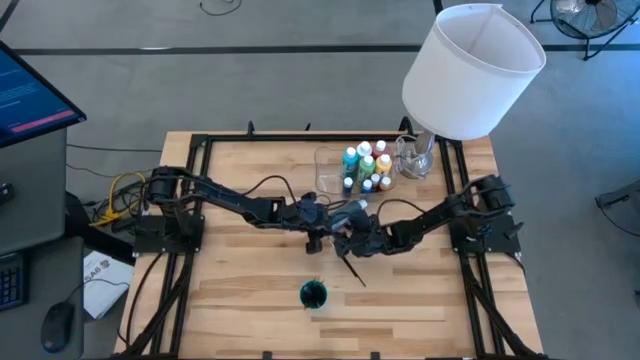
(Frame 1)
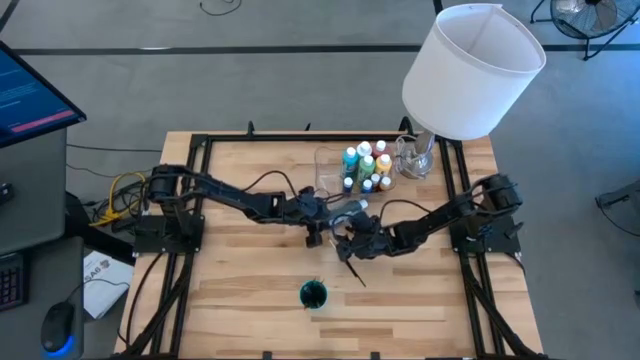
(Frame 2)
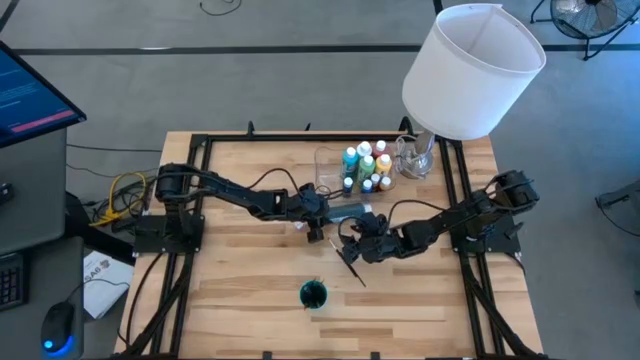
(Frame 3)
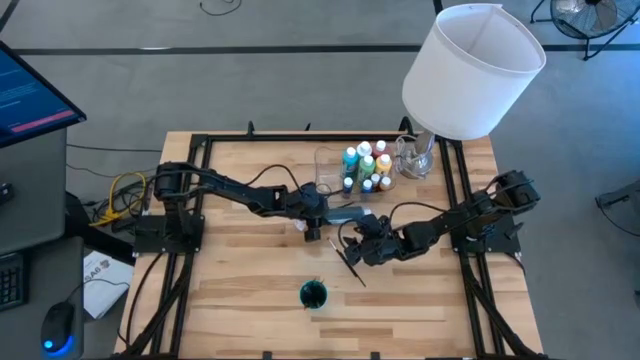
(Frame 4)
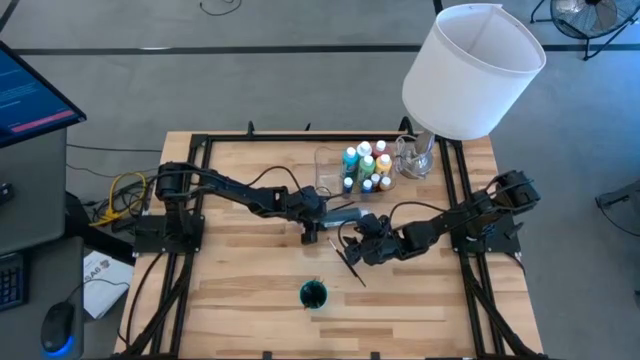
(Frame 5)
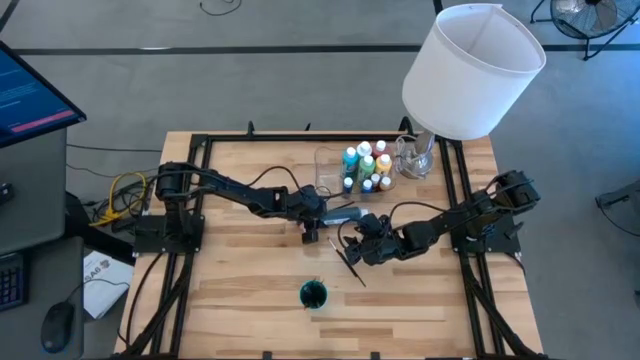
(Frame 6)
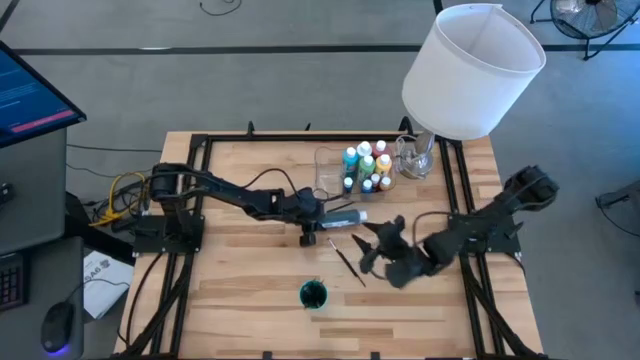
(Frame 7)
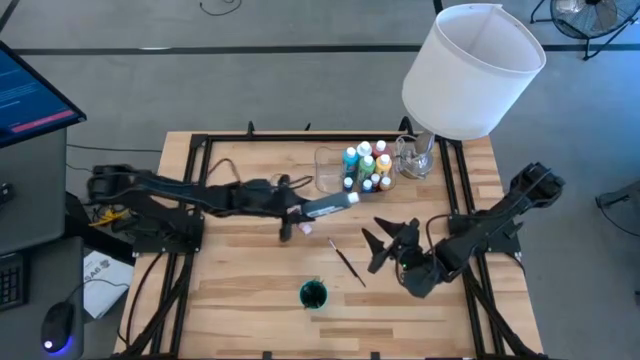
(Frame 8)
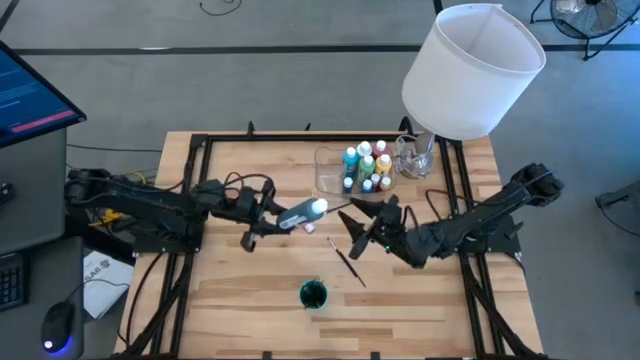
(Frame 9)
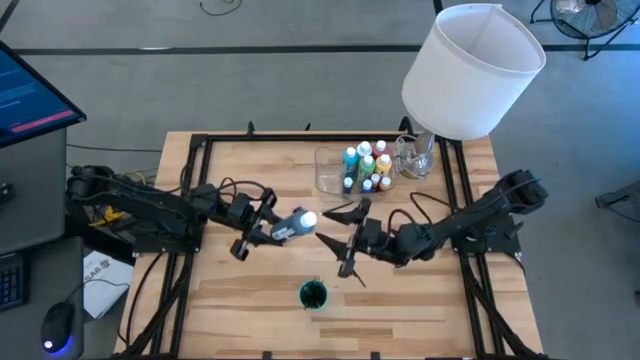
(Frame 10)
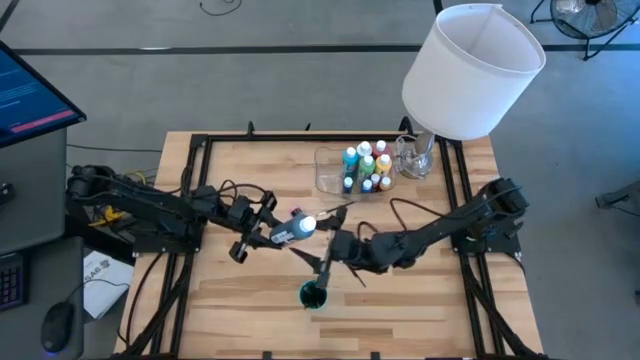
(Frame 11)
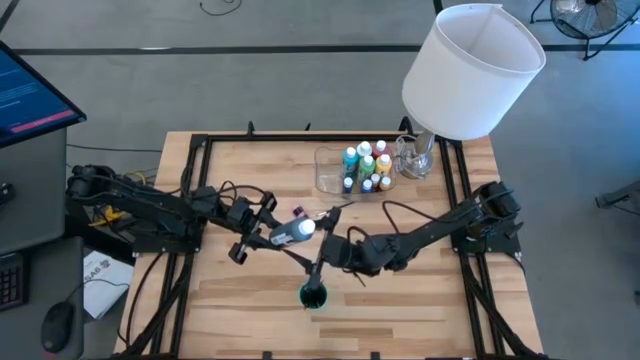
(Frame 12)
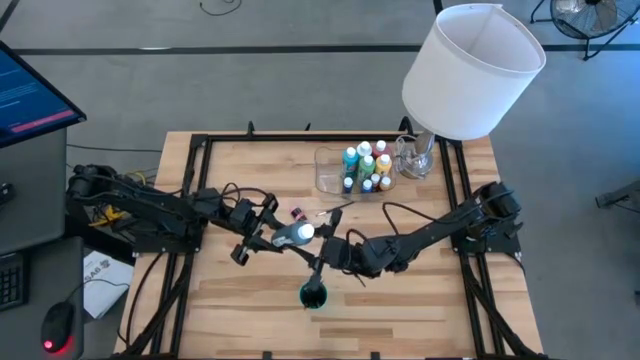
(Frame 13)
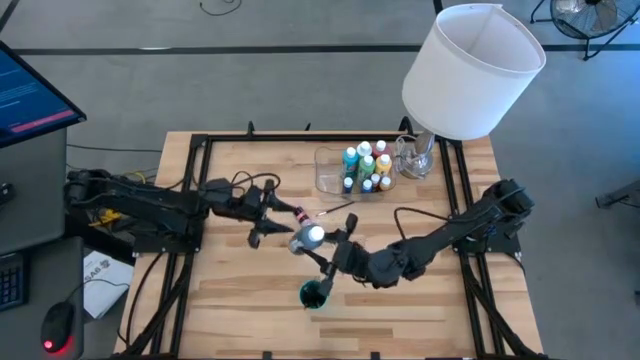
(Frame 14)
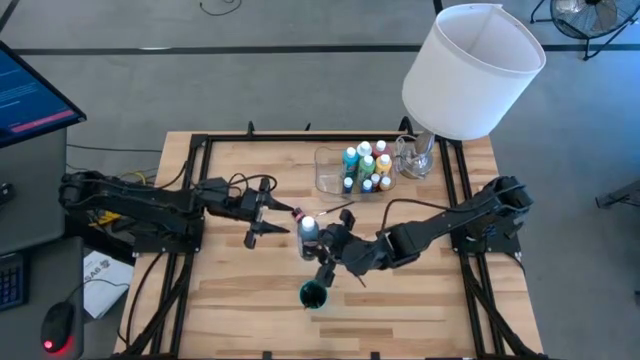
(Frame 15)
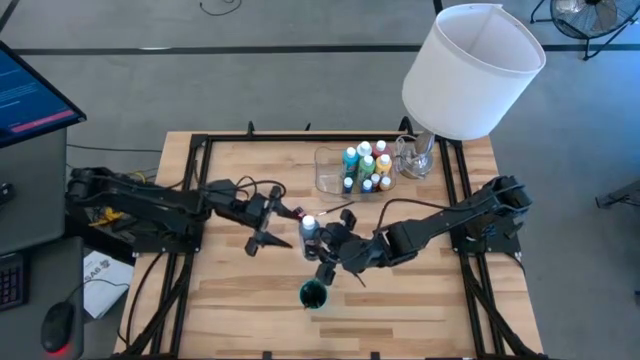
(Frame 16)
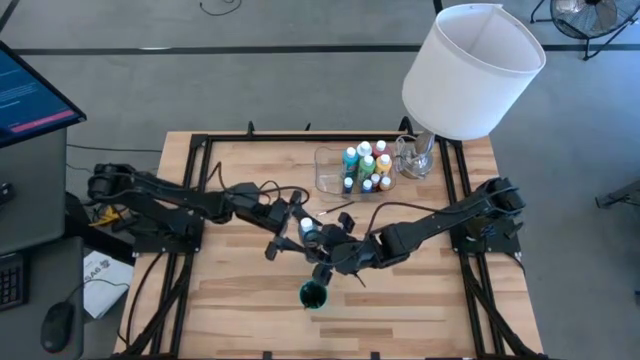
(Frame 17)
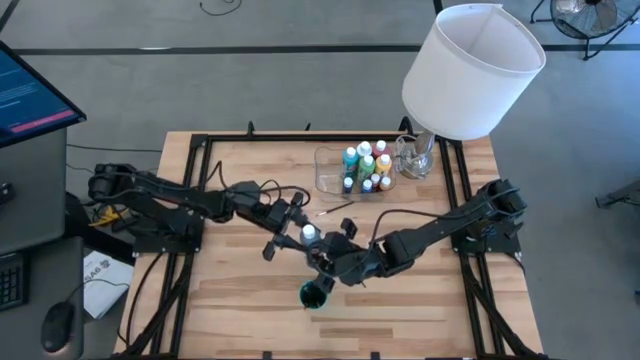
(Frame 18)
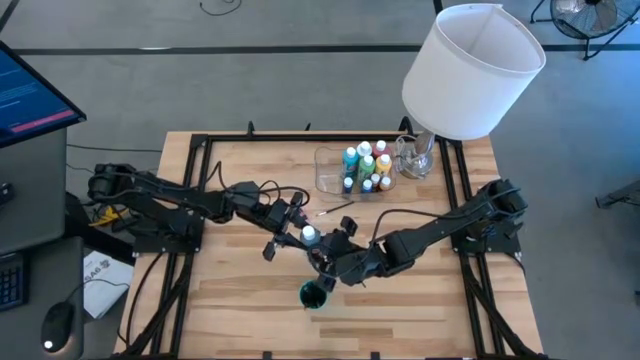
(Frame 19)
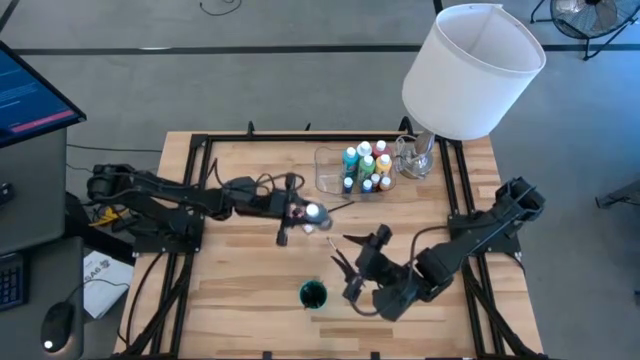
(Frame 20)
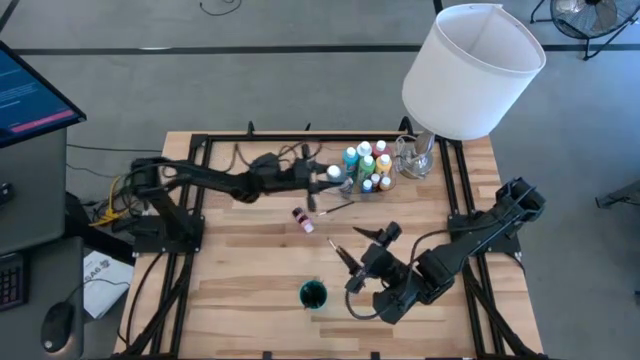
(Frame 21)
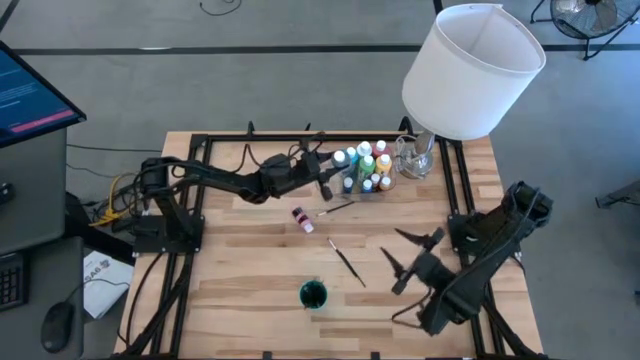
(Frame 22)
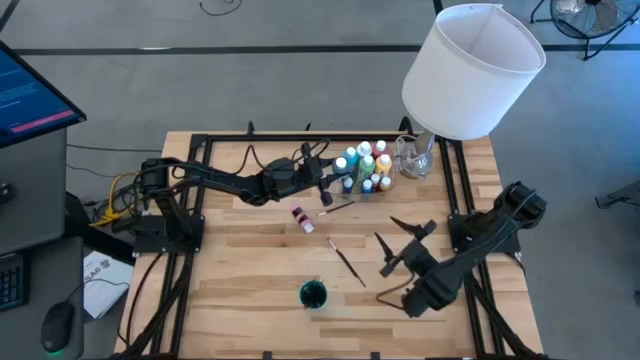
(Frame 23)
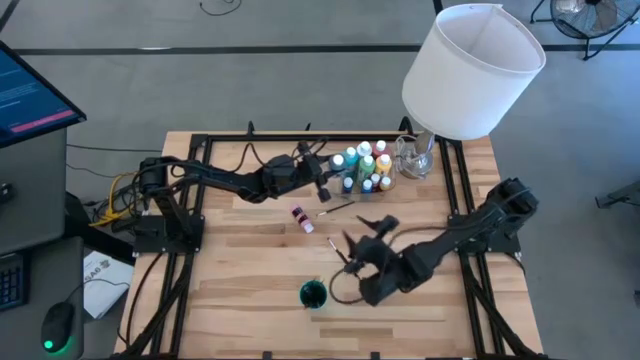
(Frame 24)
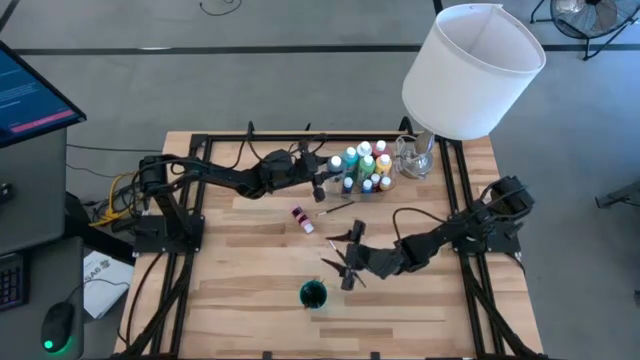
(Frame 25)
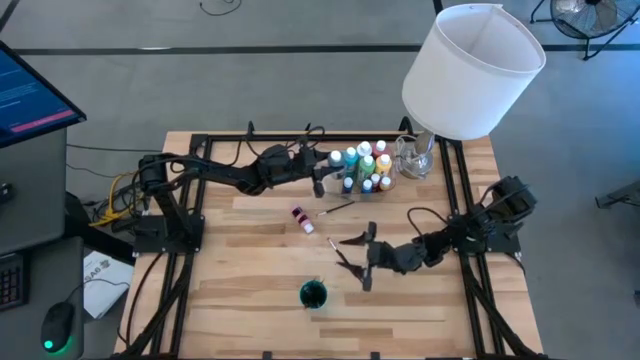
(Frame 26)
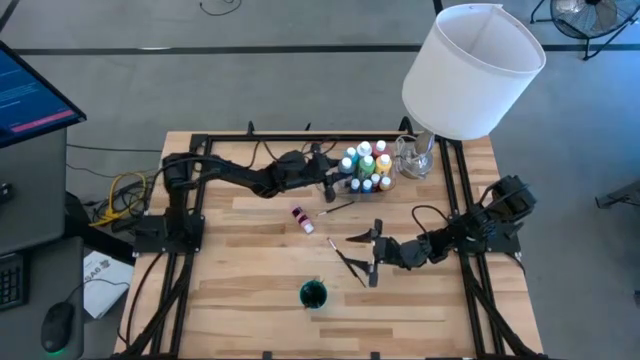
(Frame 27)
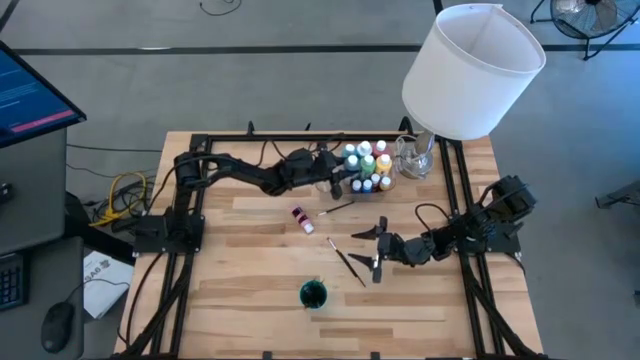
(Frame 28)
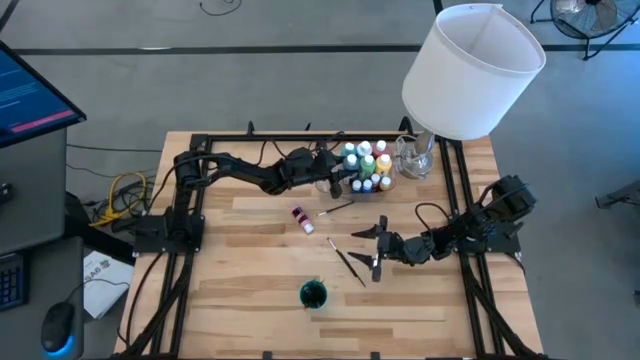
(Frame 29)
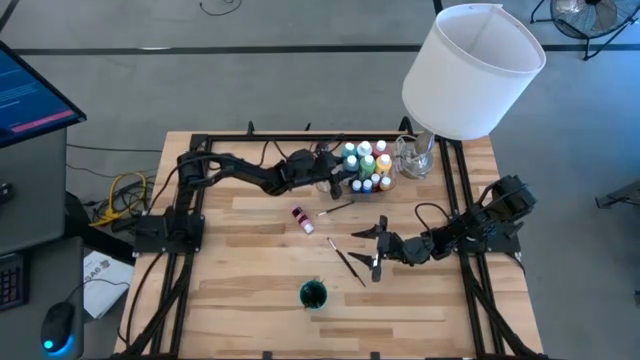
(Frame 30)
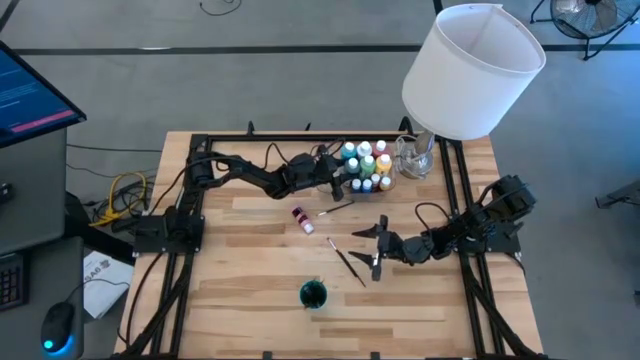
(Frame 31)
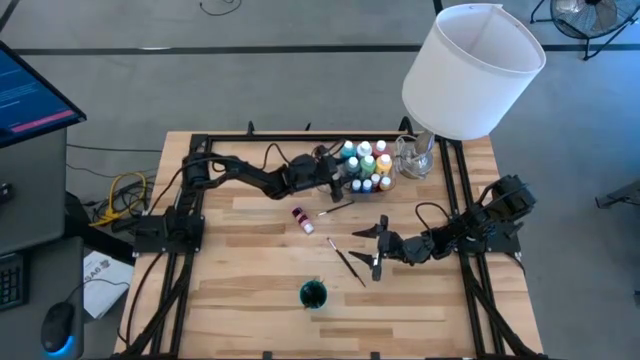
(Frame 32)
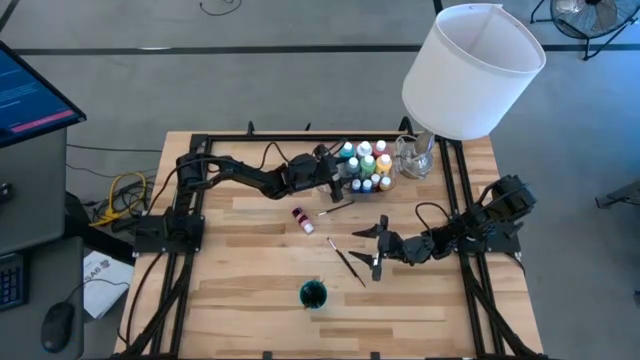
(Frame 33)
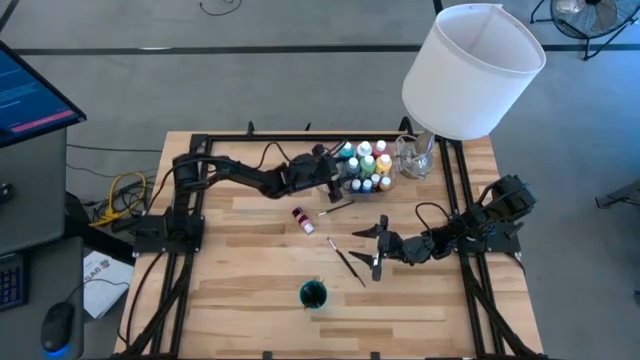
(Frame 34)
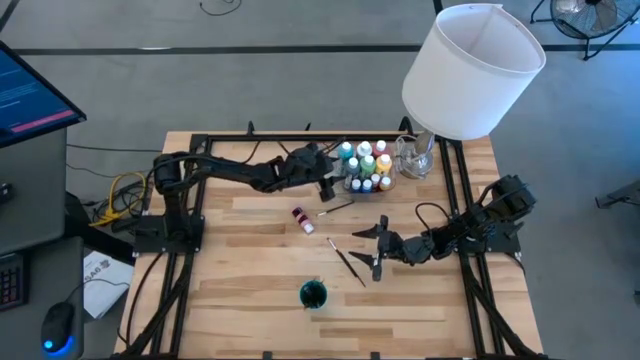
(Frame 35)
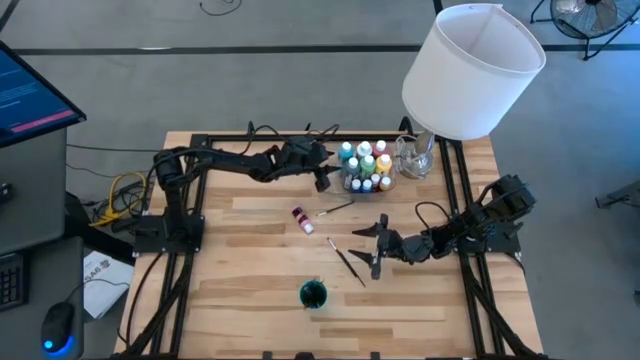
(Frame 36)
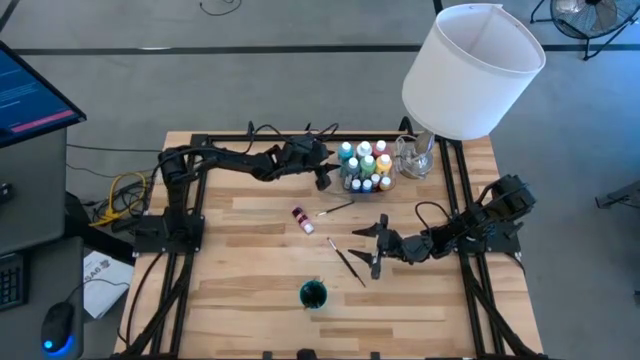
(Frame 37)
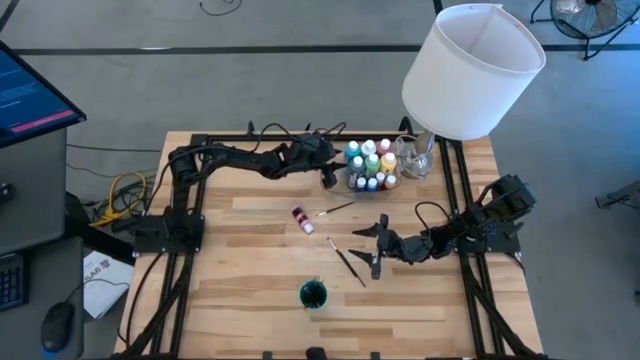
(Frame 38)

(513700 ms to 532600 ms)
Task: Pick & Place Paint Supplies
Put the big black paint bottle into the transparent bin
